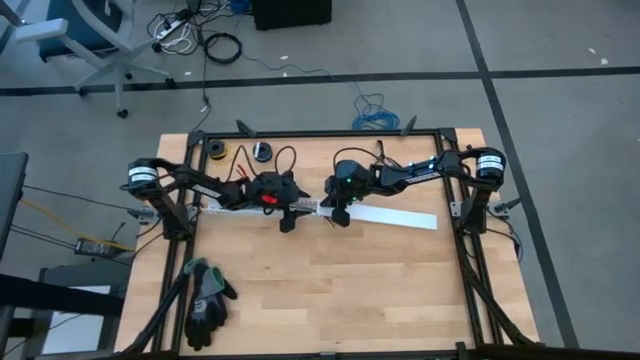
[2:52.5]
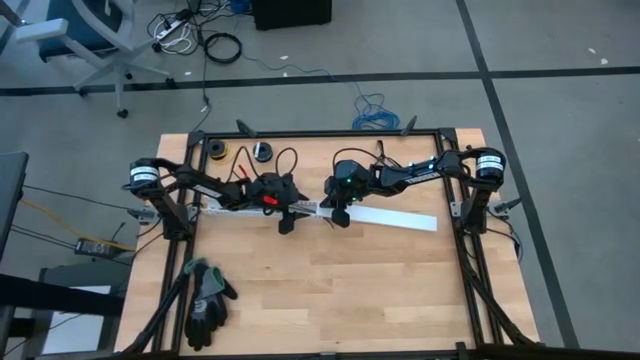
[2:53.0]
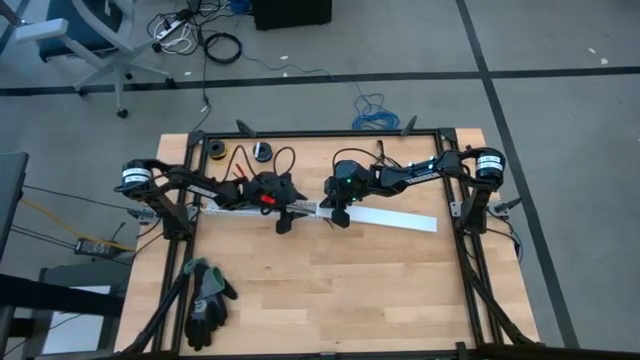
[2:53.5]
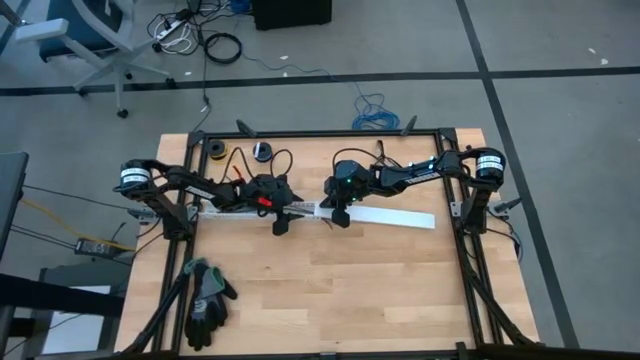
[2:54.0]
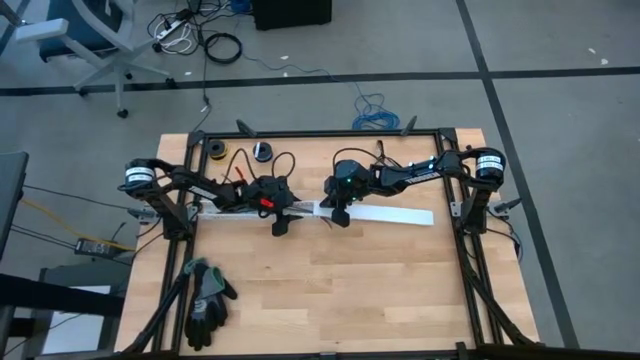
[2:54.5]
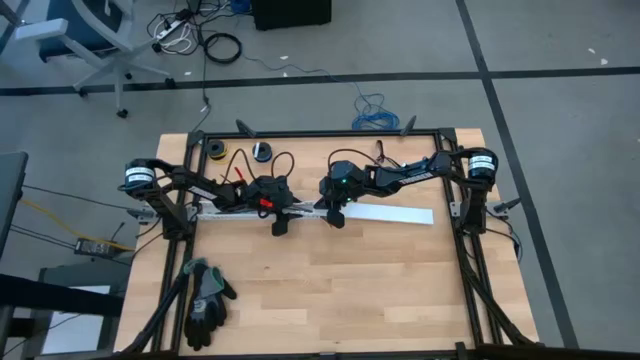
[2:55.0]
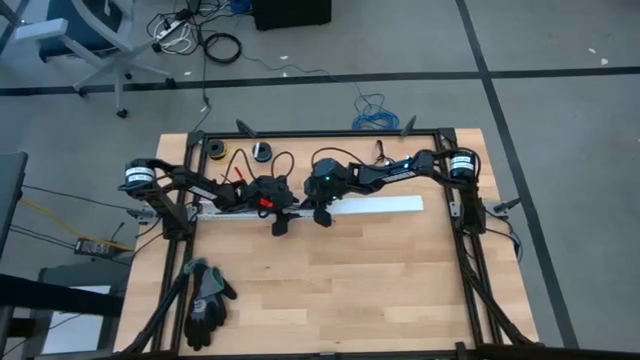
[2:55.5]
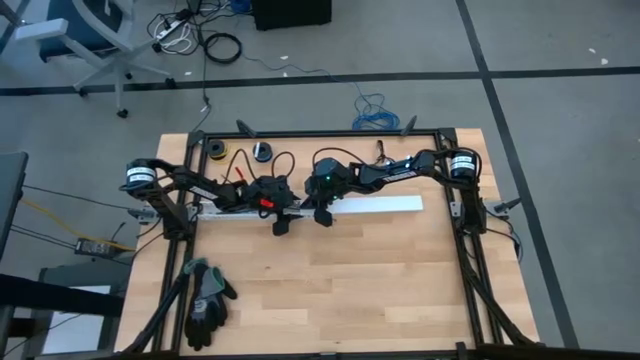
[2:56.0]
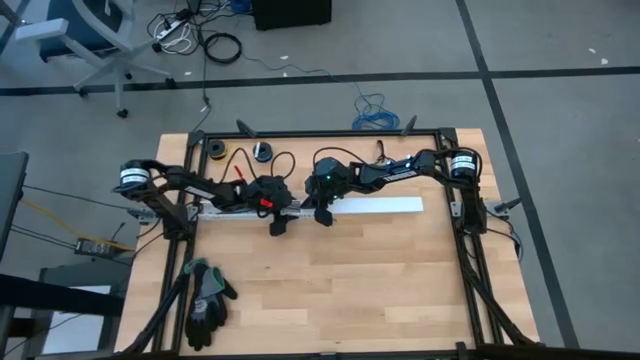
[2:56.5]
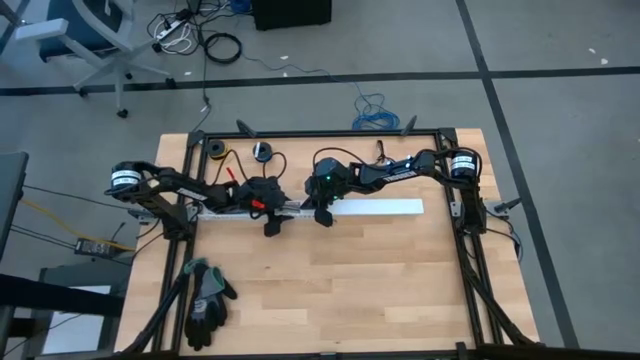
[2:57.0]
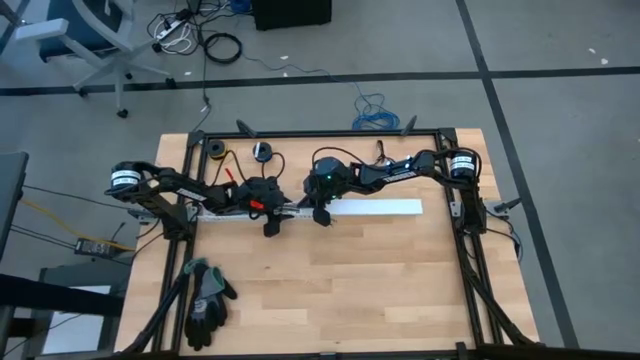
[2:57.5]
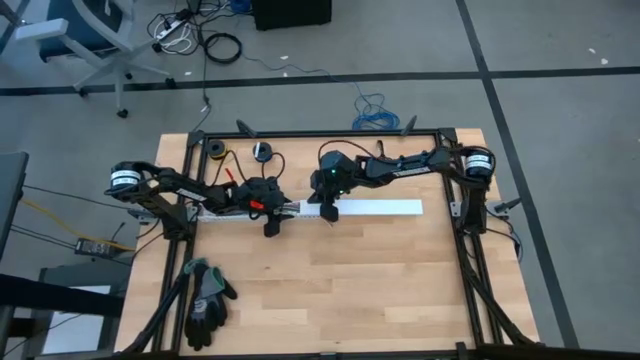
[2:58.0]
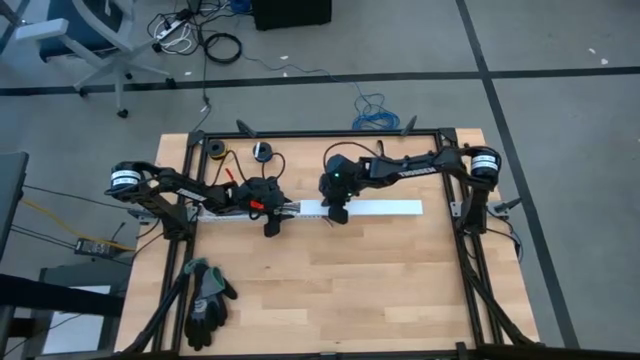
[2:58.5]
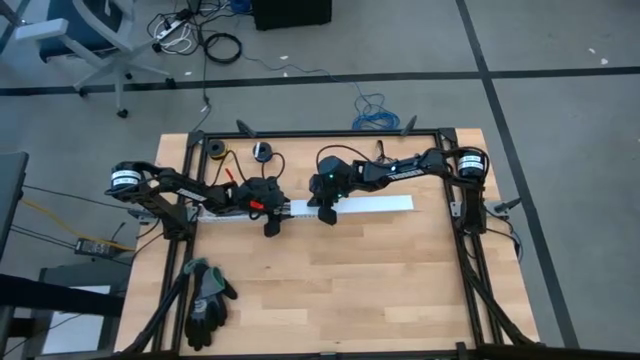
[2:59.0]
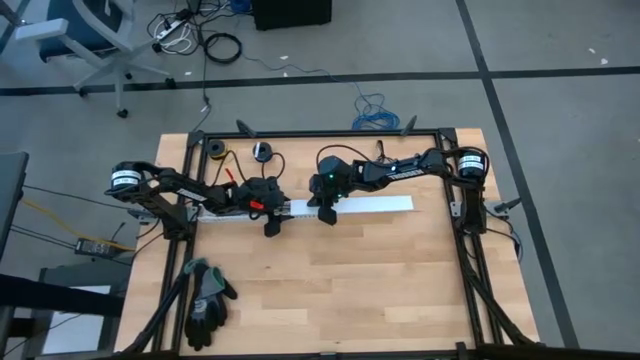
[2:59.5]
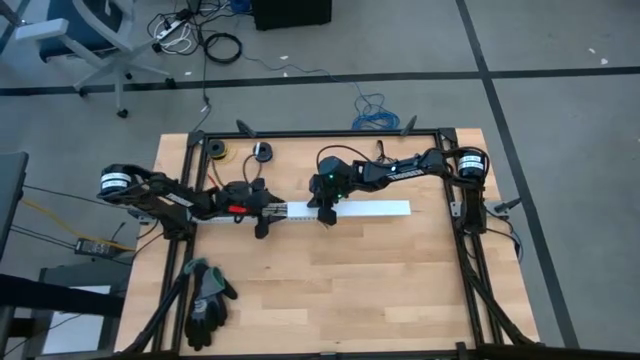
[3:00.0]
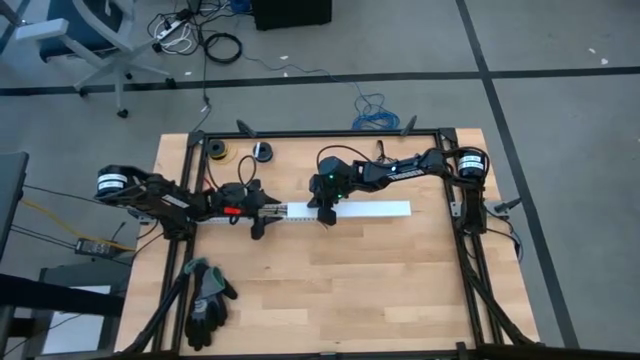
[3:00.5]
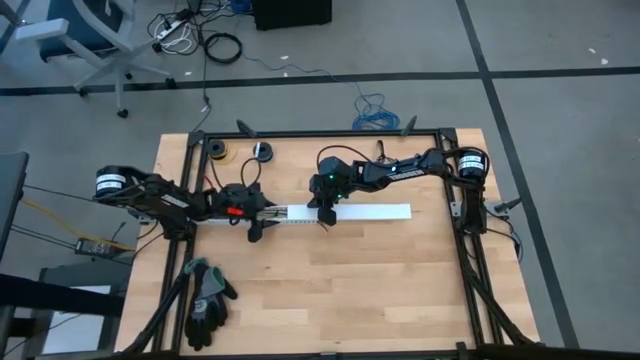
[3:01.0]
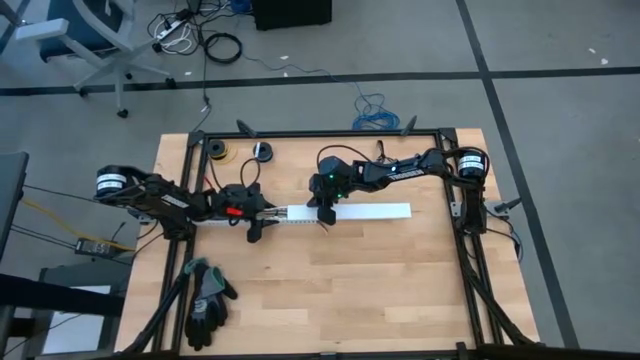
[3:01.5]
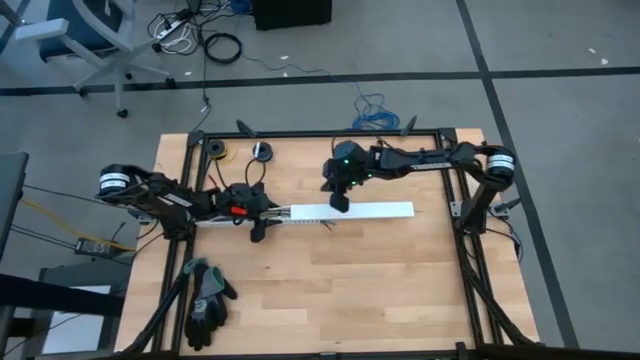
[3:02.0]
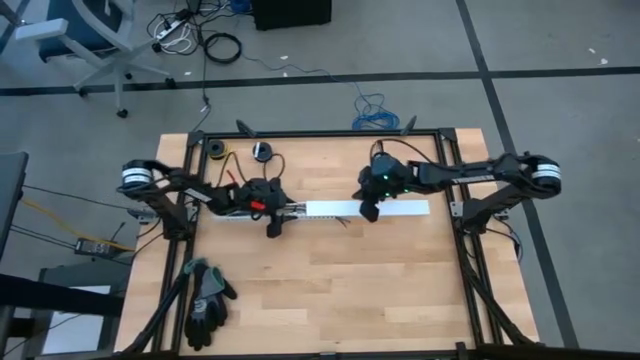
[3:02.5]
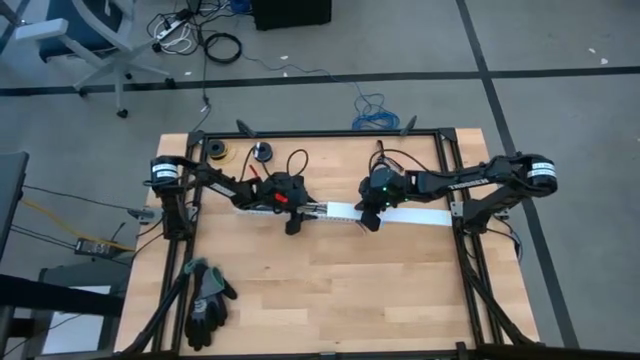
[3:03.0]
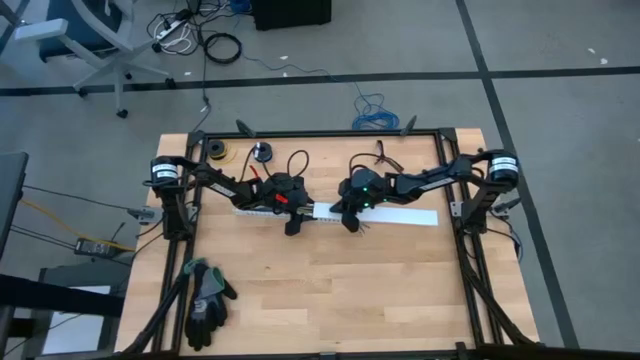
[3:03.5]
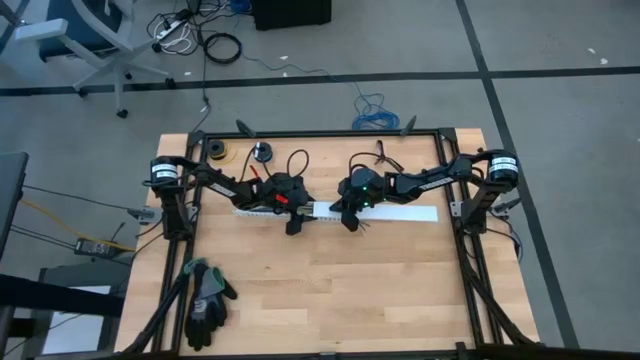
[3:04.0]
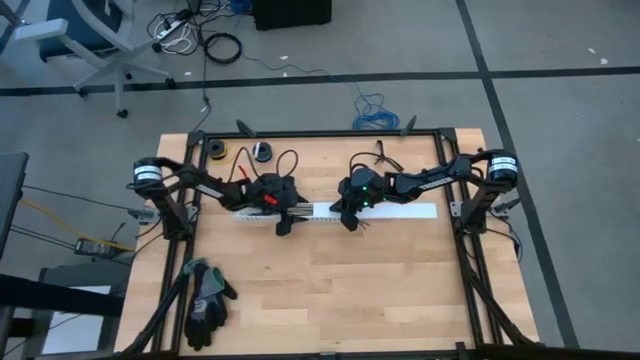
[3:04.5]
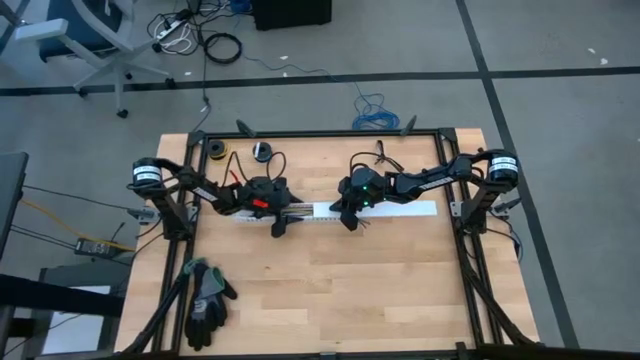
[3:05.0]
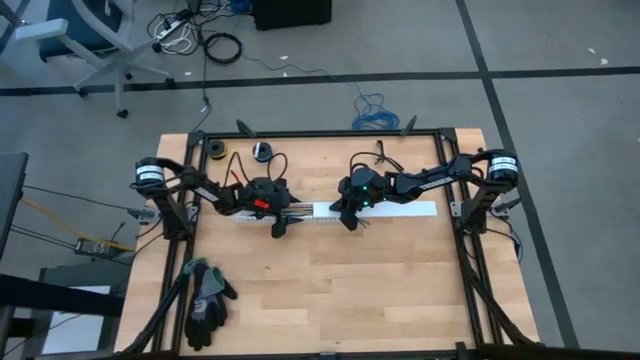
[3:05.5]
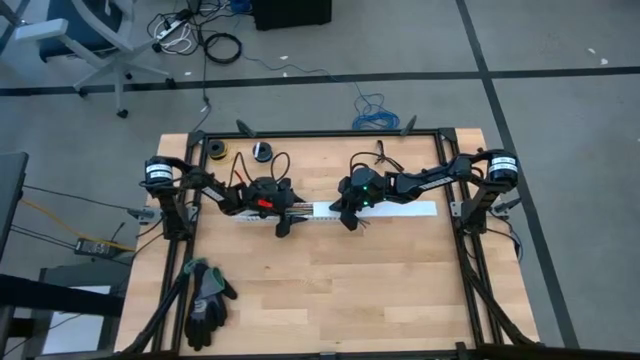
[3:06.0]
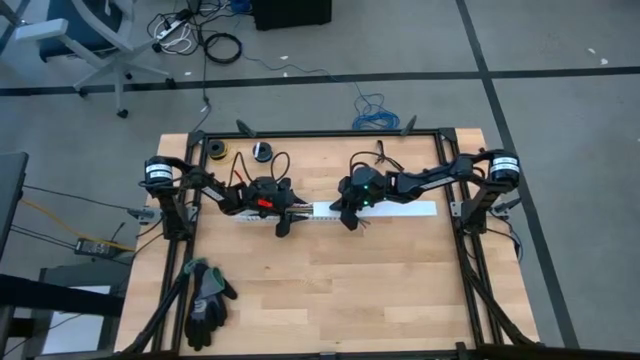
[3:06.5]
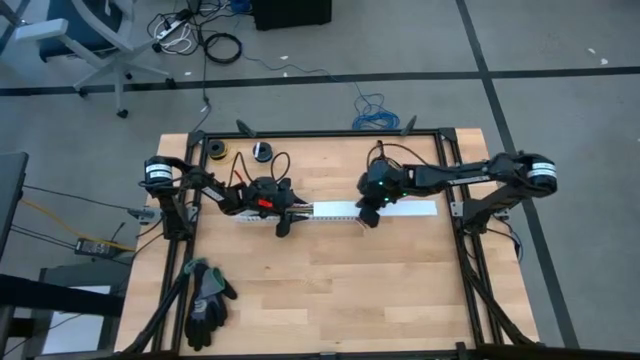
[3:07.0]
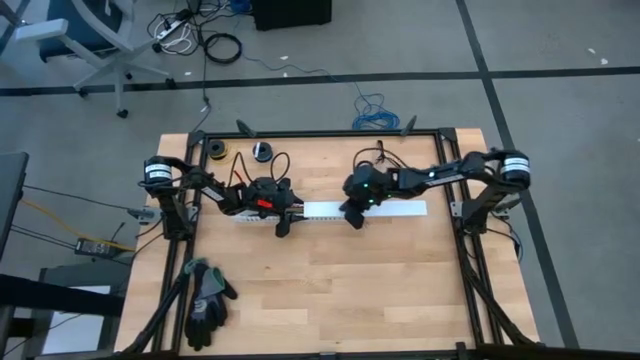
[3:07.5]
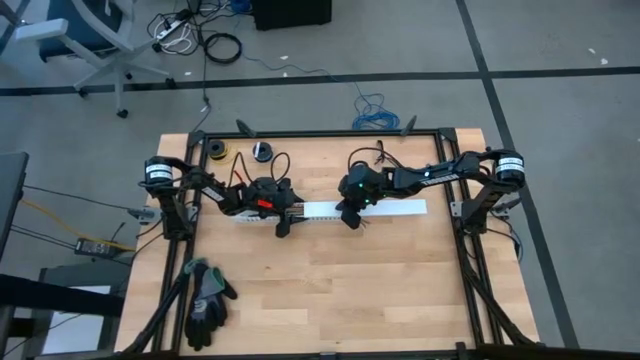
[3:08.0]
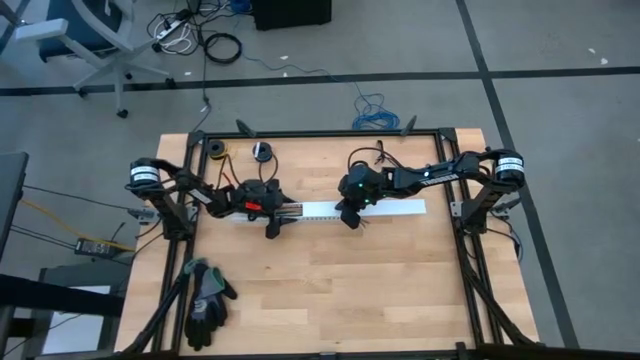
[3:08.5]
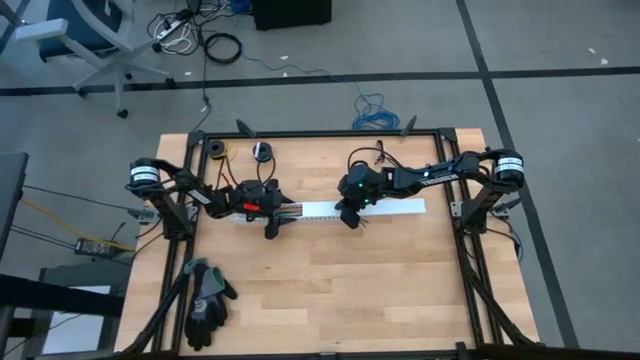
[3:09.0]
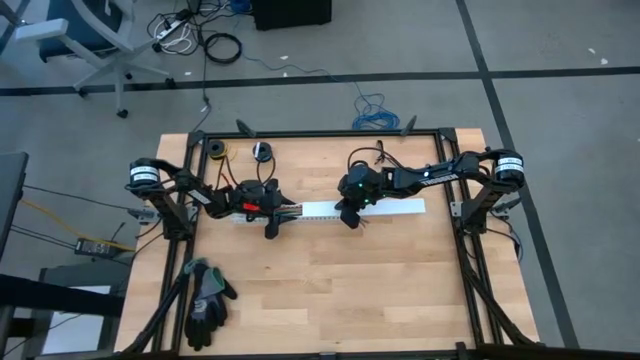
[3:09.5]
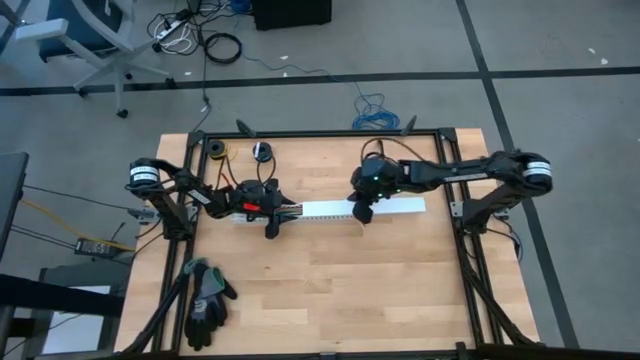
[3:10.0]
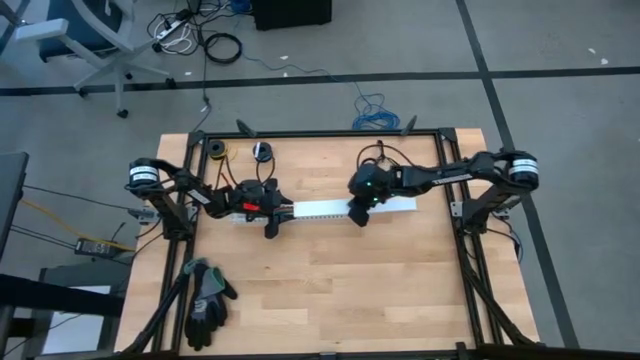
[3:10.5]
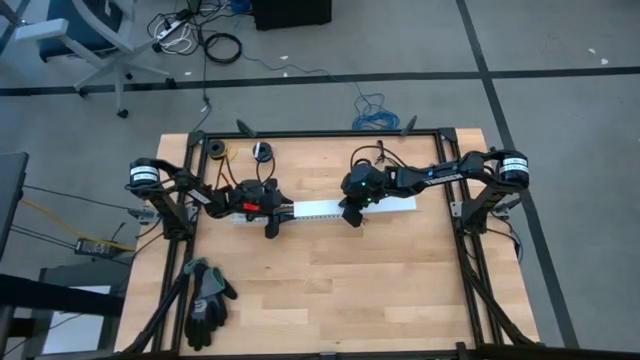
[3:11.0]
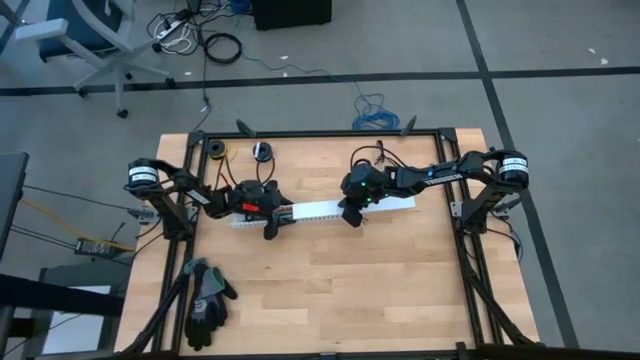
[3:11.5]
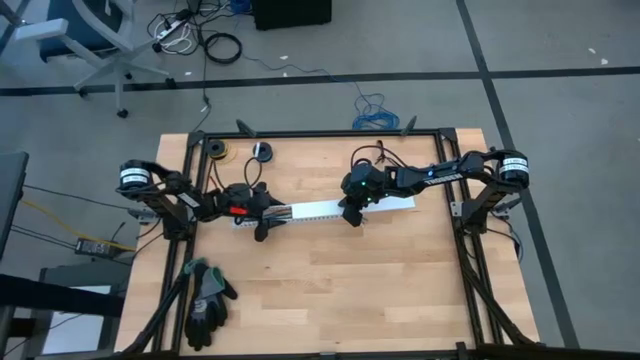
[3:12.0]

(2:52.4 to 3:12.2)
Task: Ziptie cables
Close the cable duct

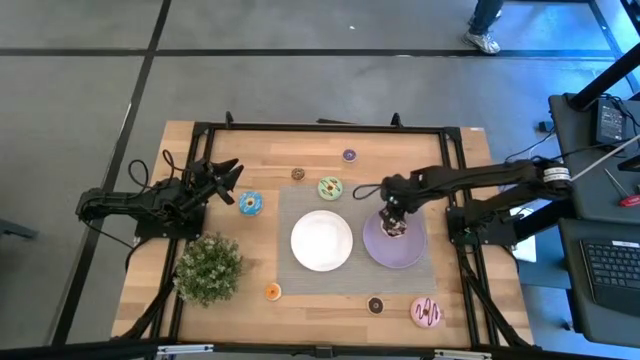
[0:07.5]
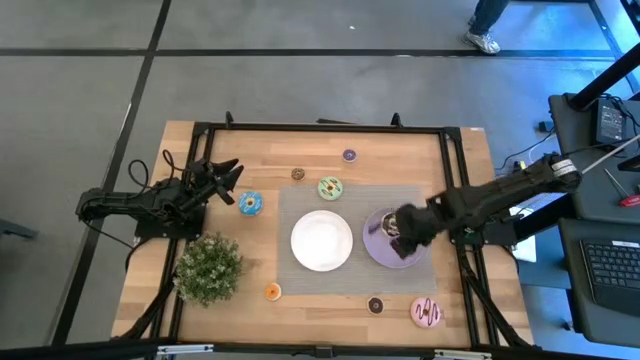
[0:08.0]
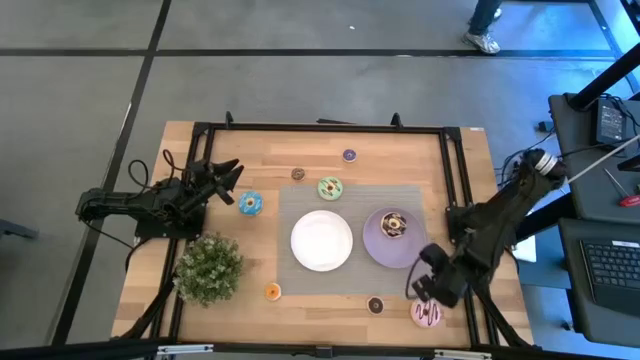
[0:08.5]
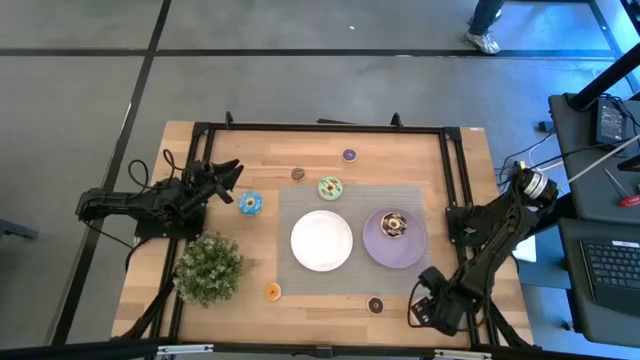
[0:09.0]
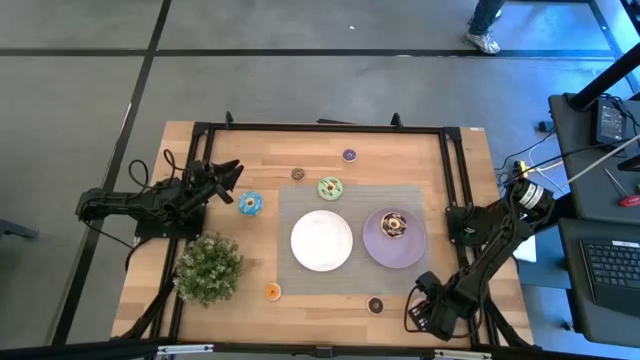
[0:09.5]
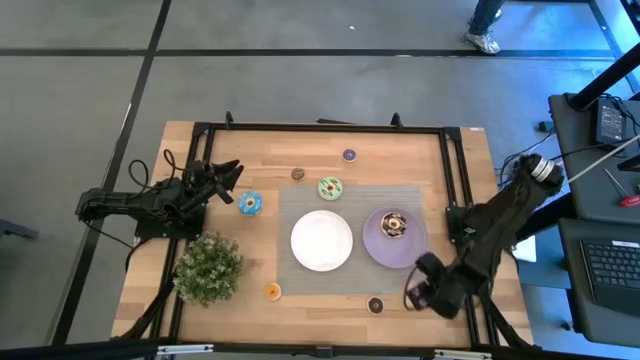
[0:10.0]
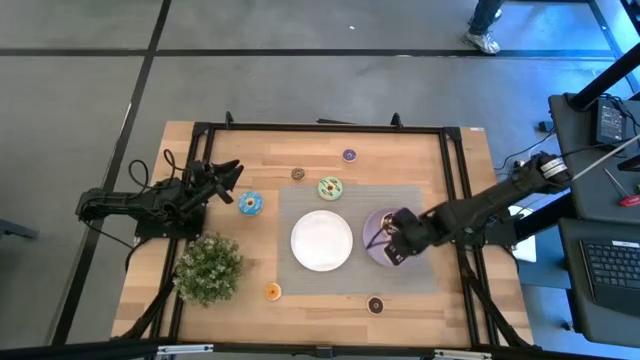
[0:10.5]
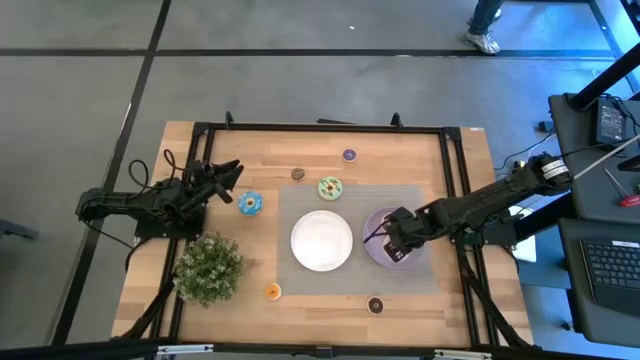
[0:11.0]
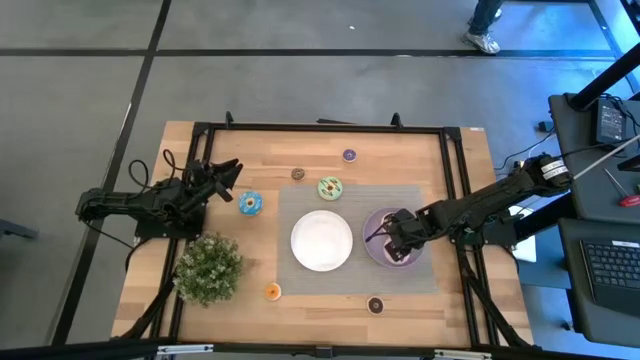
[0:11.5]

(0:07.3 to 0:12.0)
Task: Pick & Place donuts
Put the large purple donut on the purple plate
